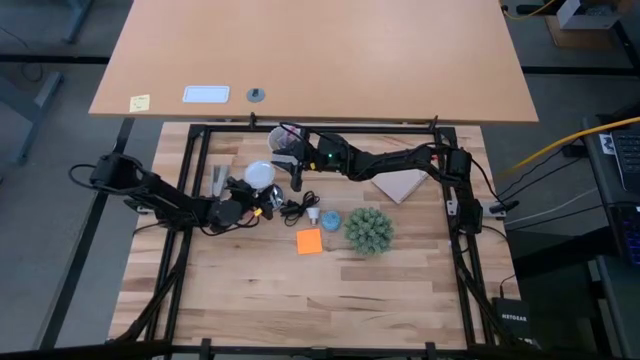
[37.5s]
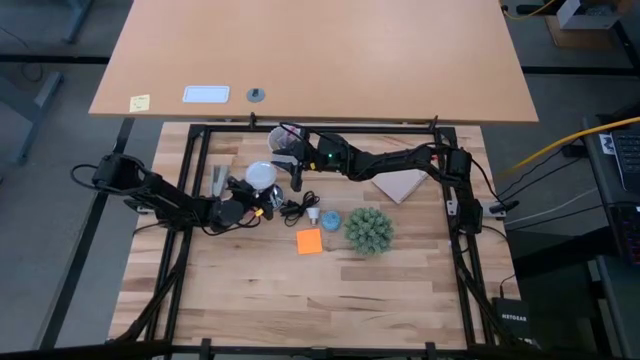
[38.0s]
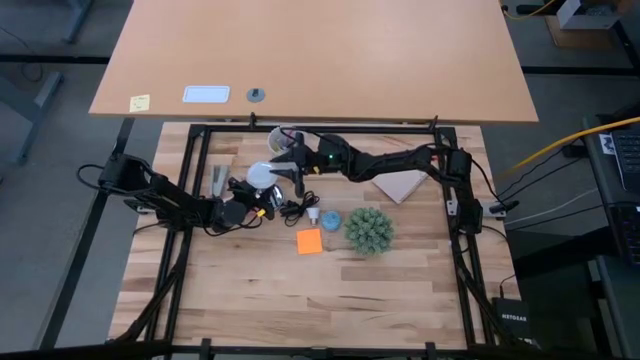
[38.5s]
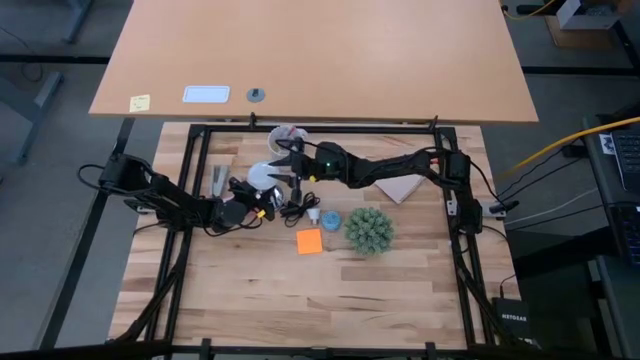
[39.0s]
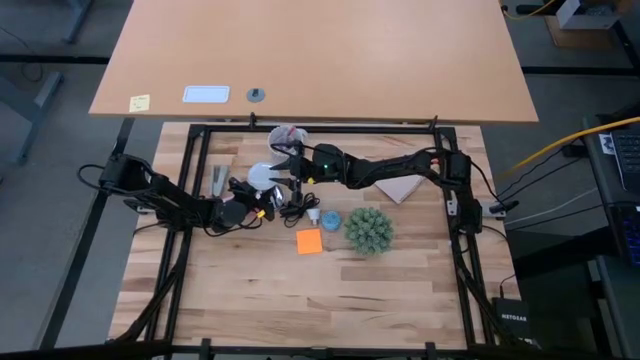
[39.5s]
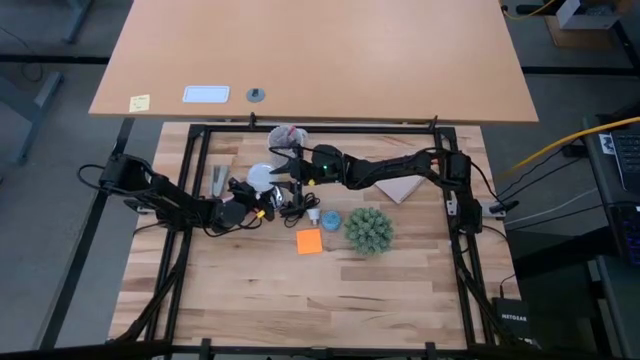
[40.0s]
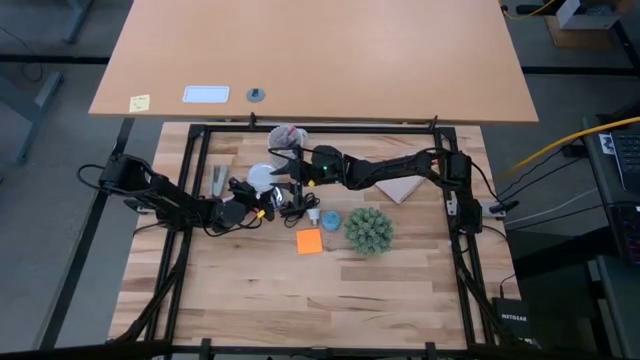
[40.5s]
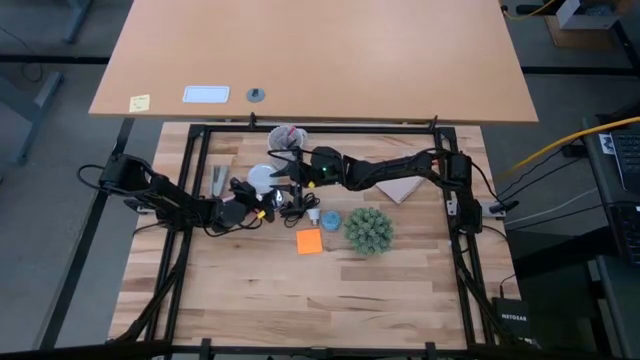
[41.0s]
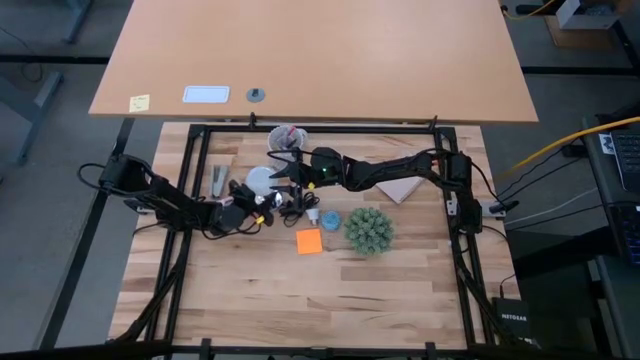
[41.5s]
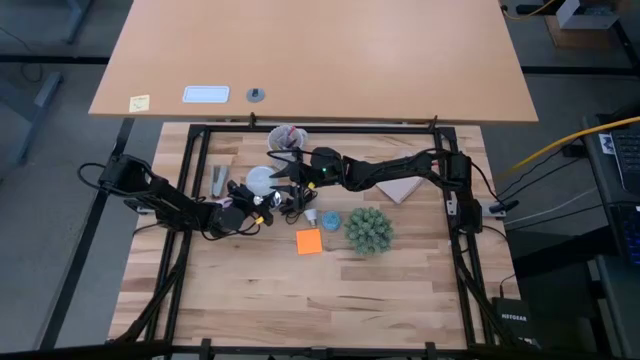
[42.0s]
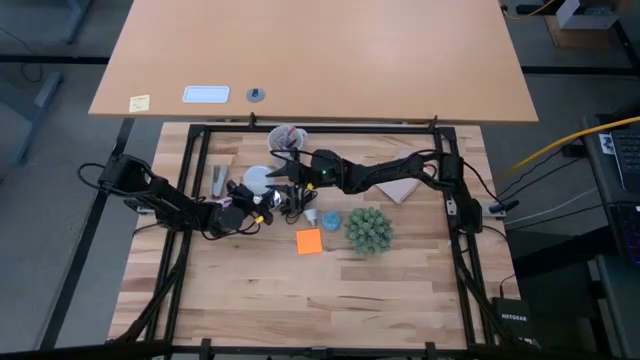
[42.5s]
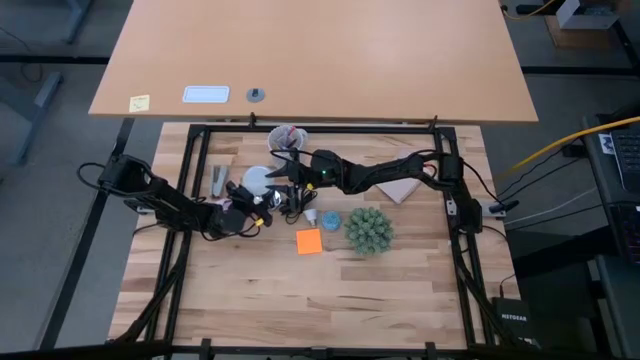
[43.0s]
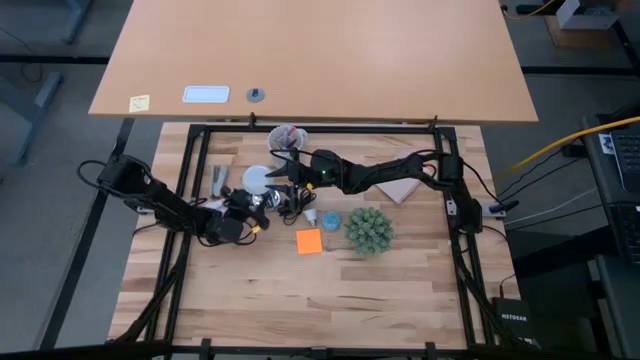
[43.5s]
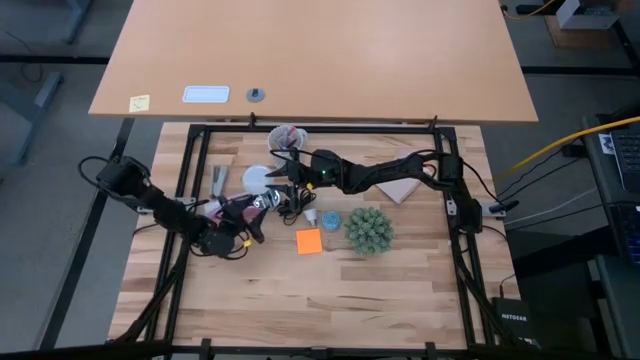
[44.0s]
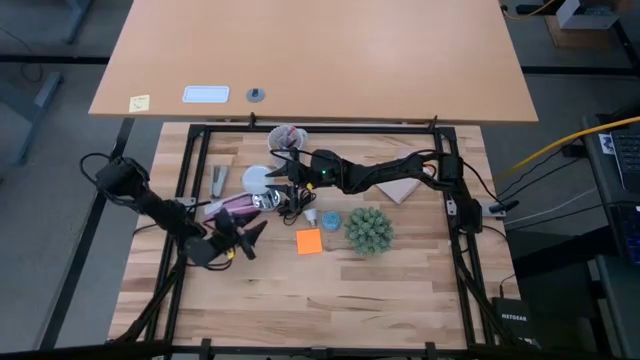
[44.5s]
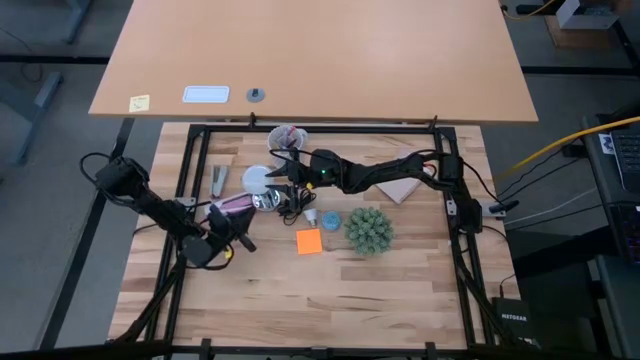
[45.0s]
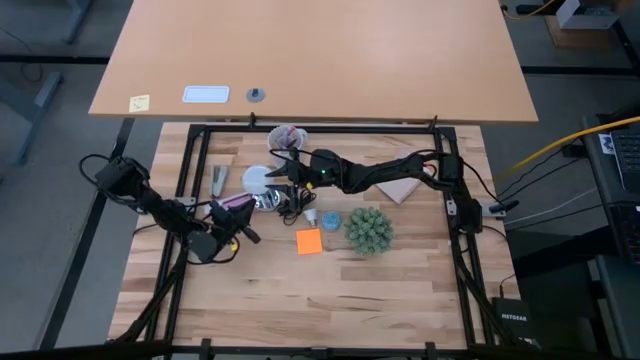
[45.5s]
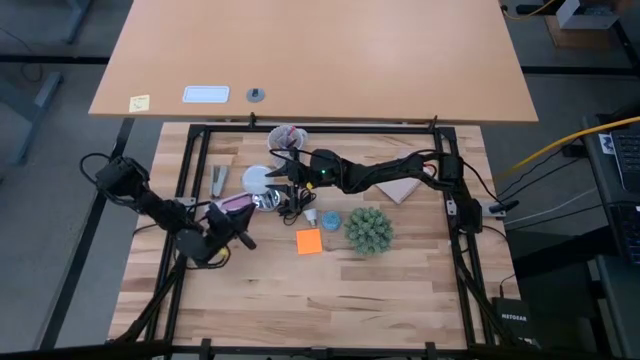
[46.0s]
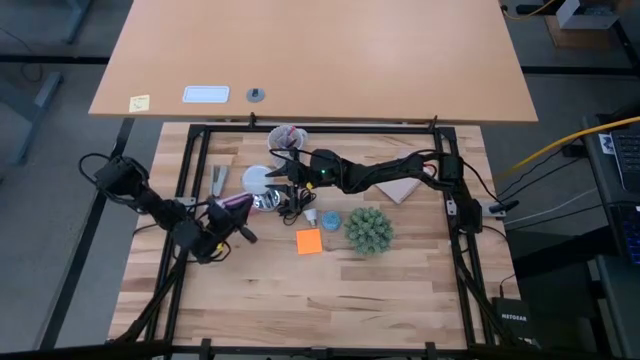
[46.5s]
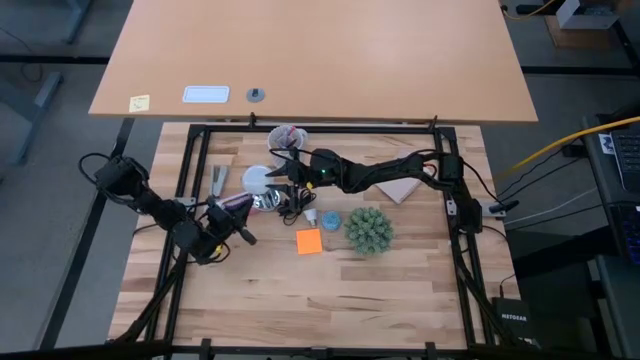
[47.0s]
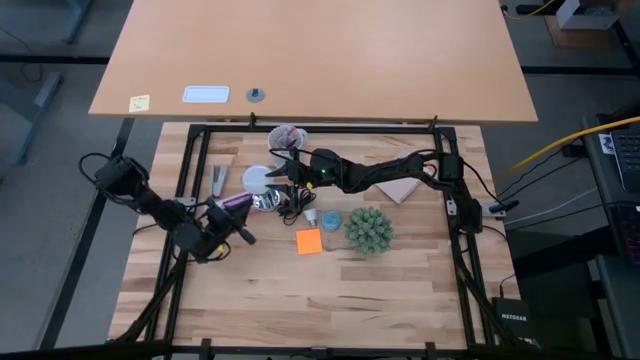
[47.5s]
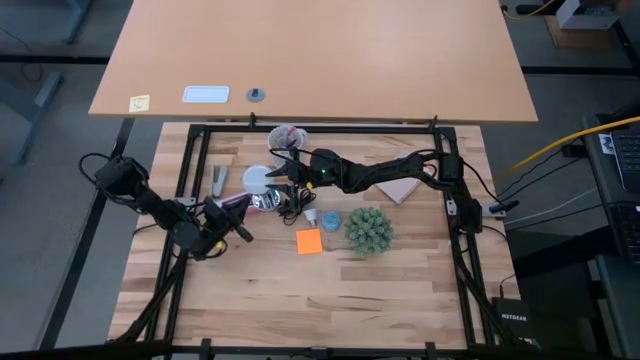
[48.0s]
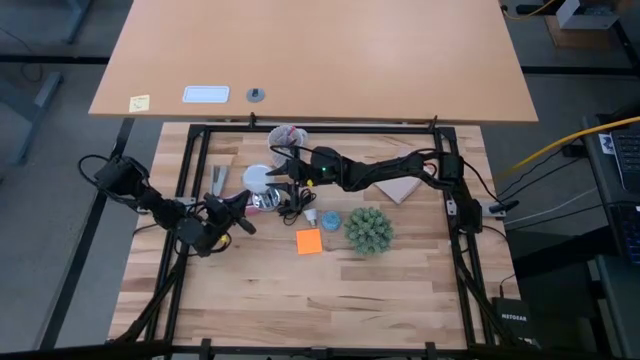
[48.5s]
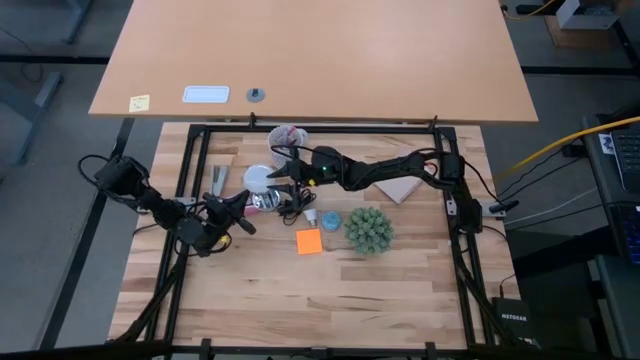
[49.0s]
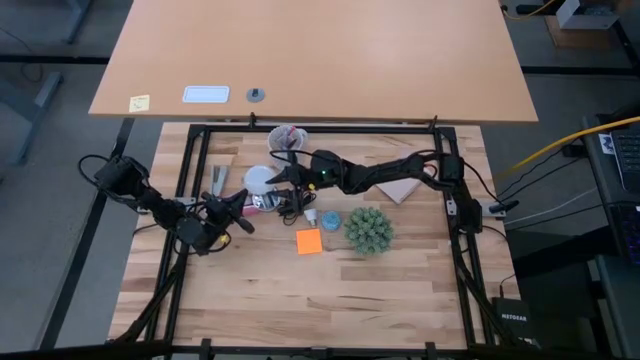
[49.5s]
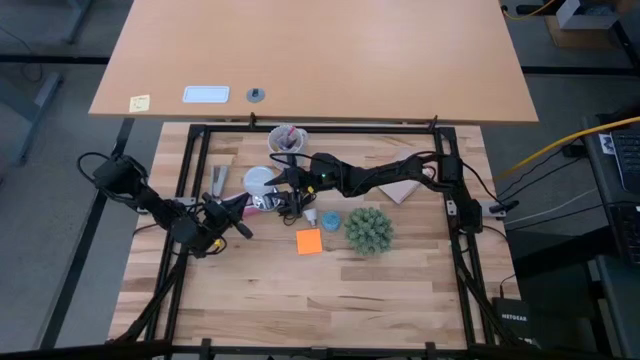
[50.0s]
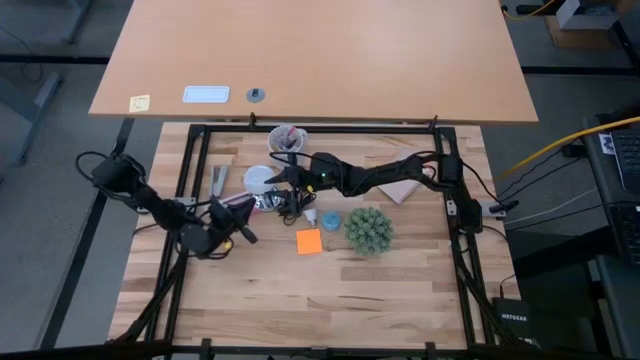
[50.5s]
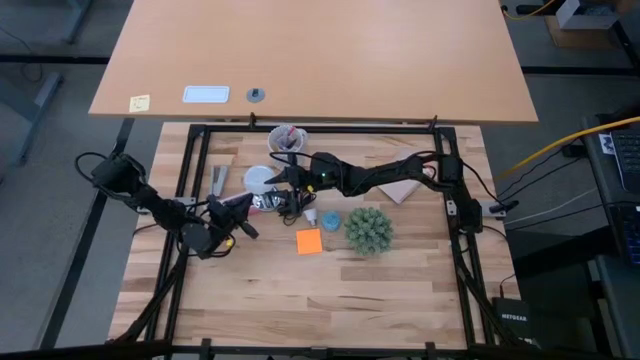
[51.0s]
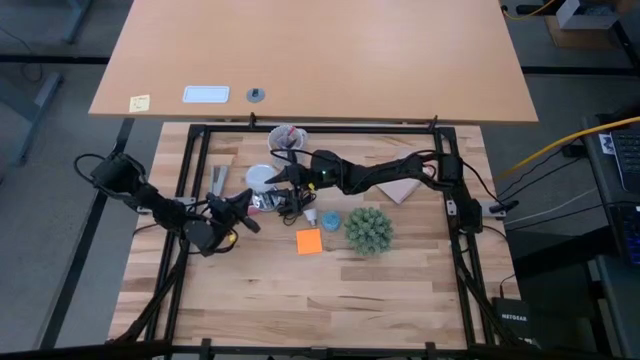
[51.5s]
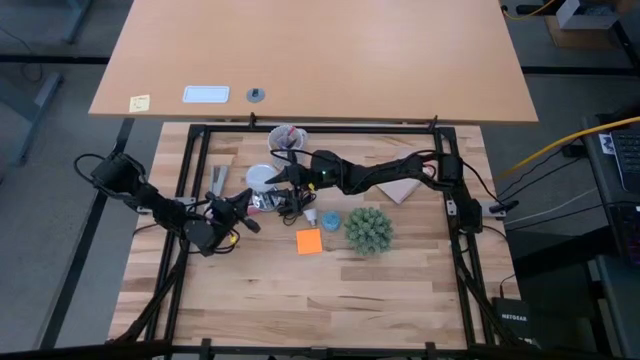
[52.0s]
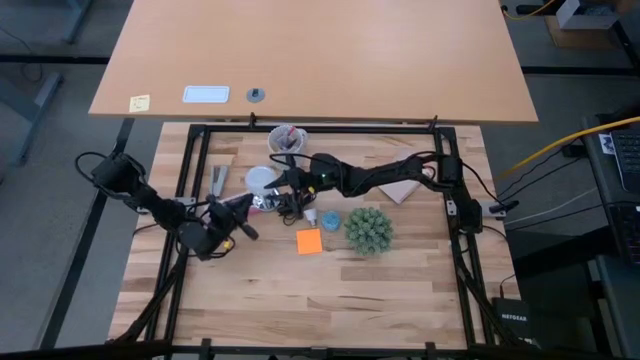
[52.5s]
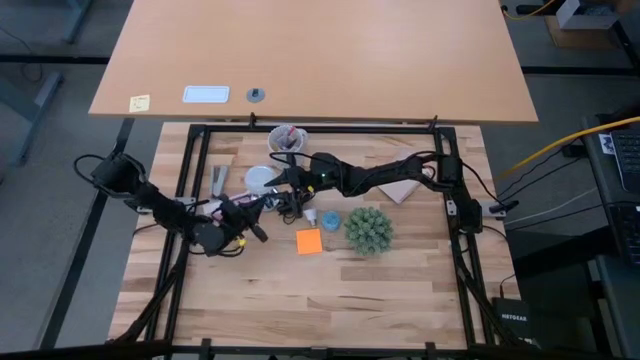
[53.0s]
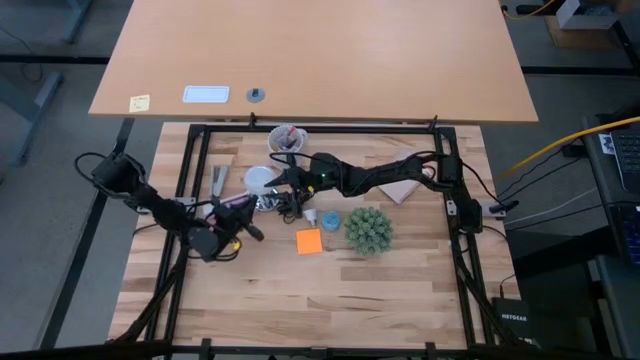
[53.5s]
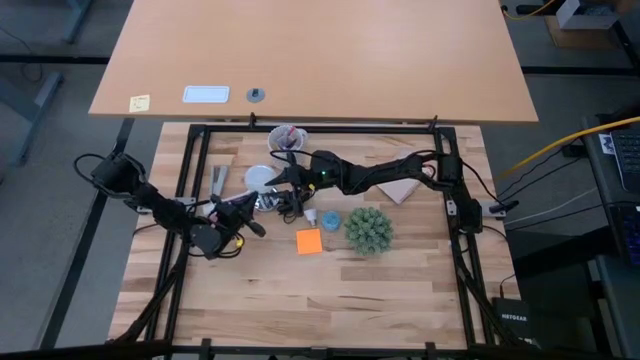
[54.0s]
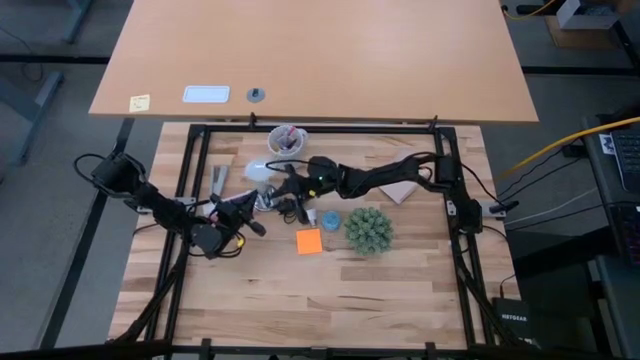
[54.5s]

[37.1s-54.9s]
Task: Screw lightbulb
Insert the lightbulb into the silver lamp

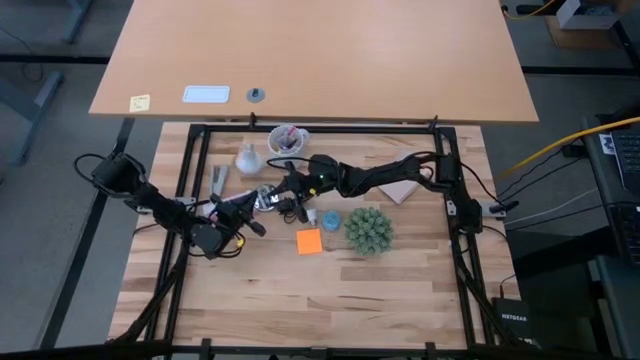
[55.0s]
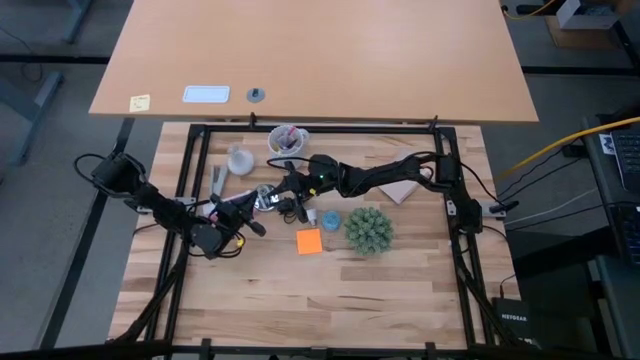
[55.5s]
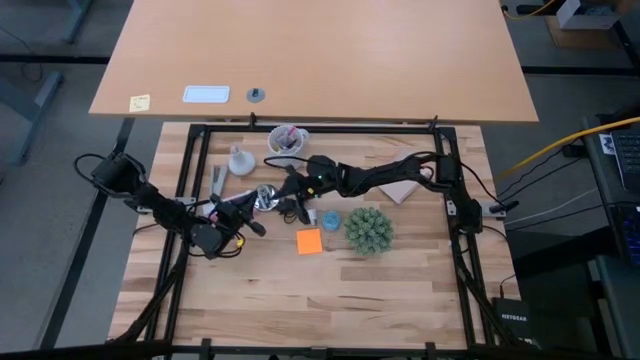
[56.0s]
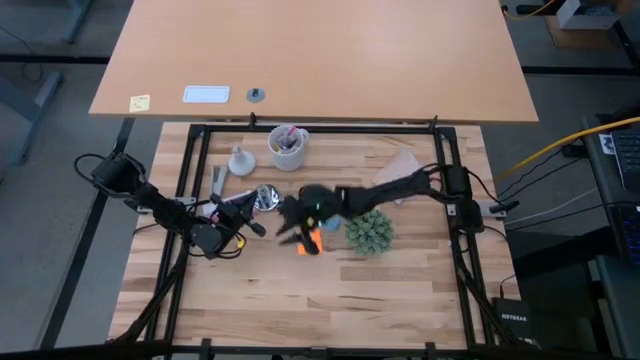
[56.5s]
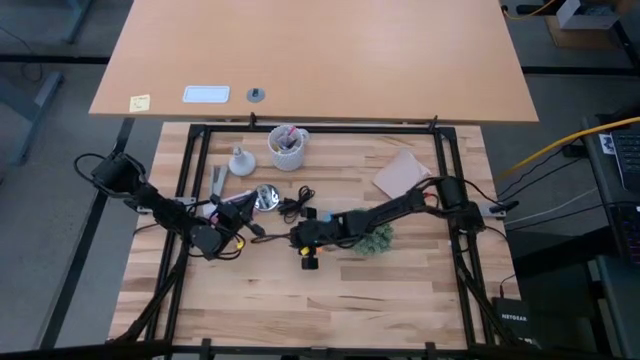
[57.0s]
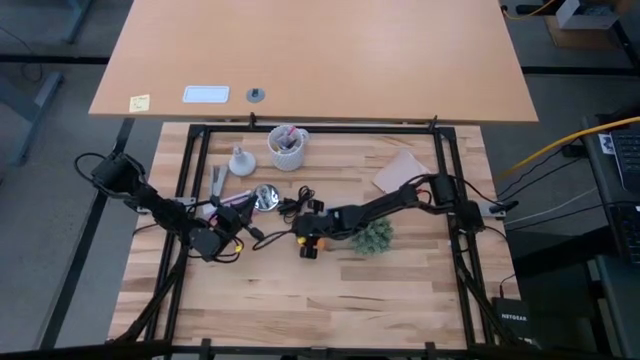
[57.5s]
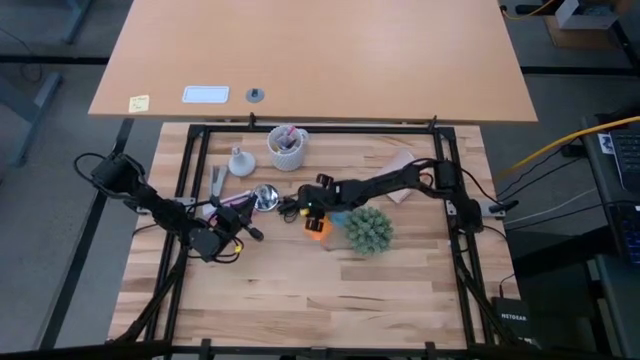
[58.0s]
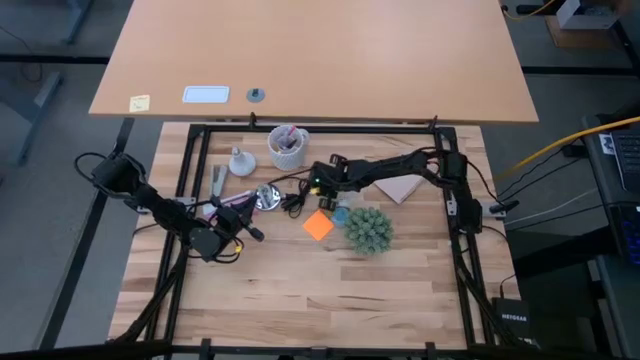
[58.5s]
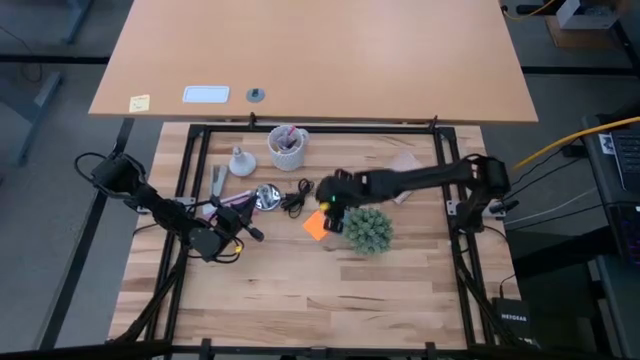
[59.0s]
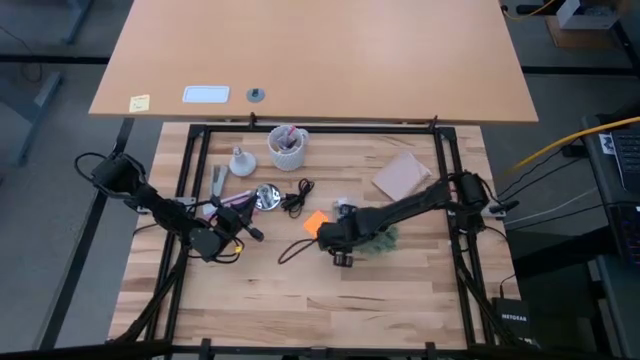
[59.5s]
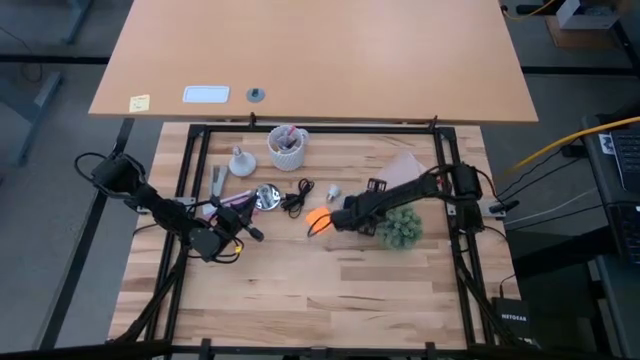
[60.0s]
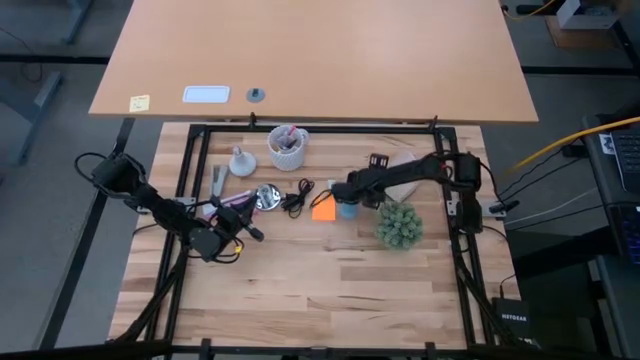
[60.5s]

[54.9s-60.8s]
Move the broken bulb, sticky notes, potted plant and scented candle to the right of the table
